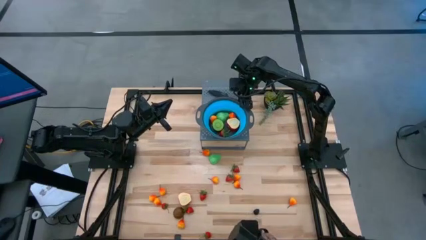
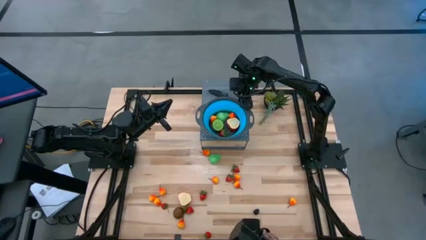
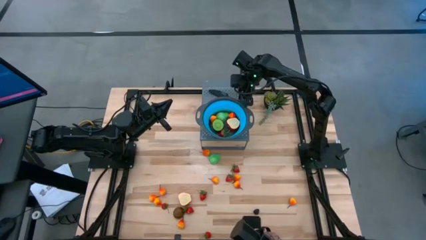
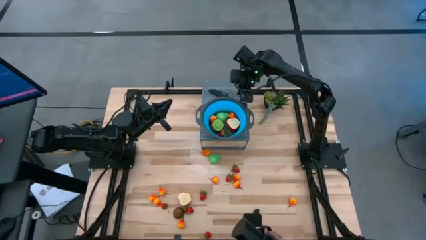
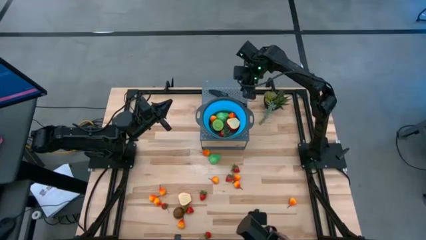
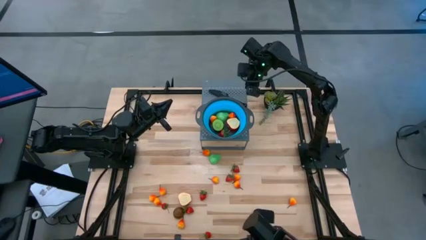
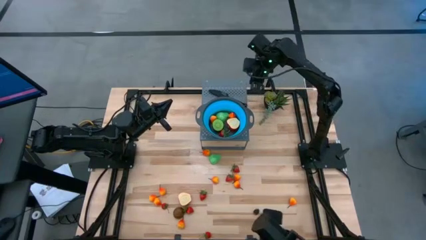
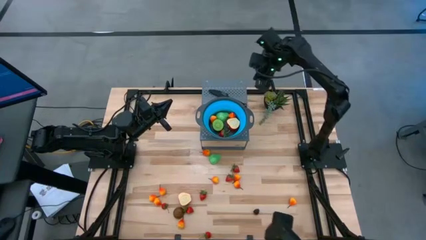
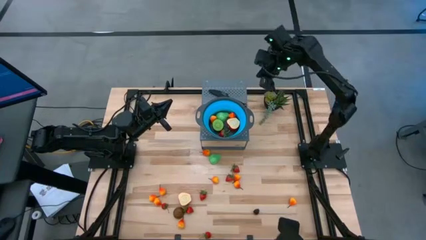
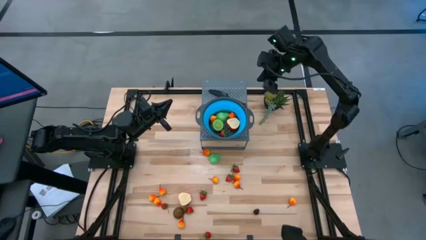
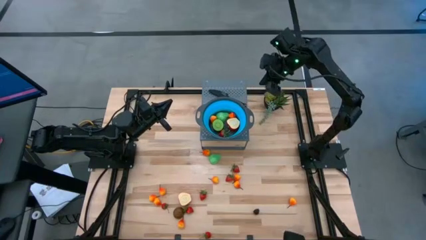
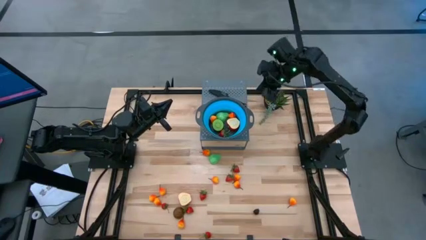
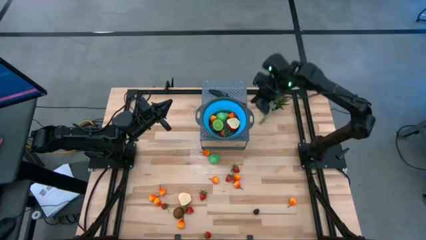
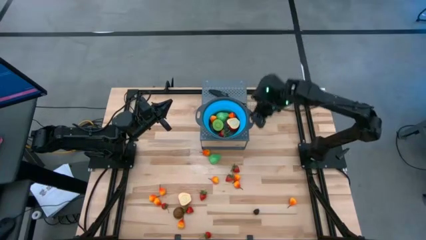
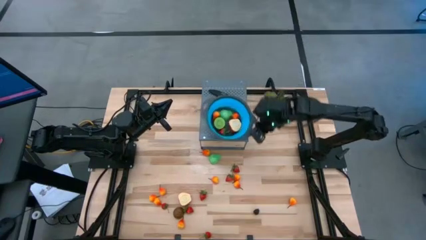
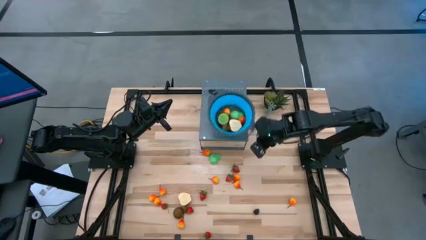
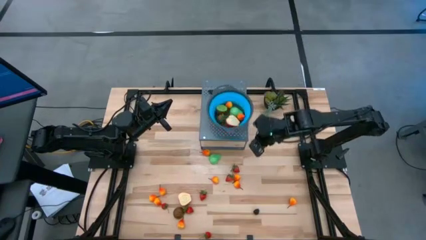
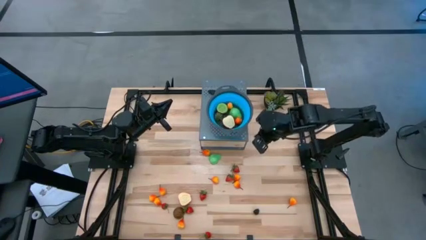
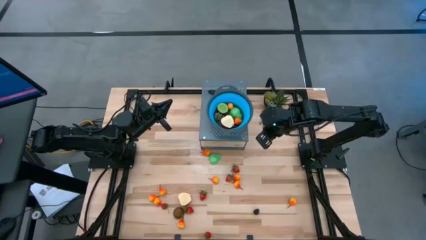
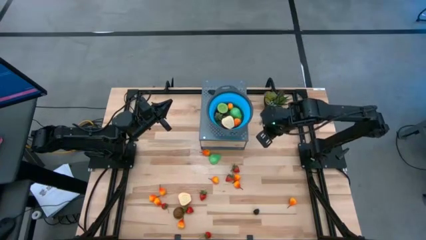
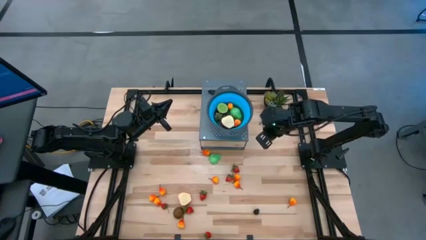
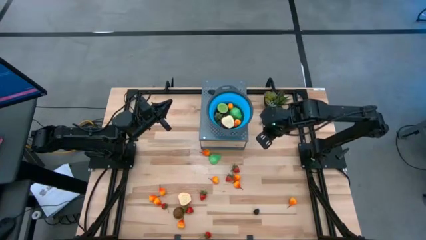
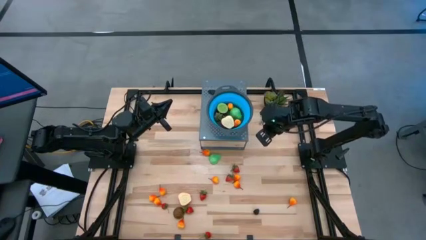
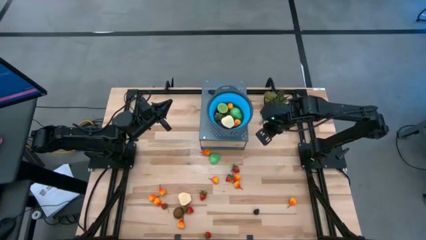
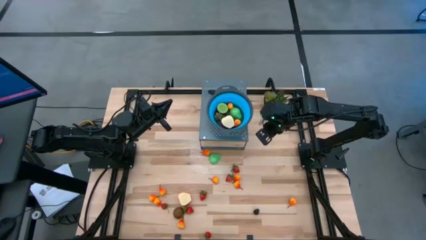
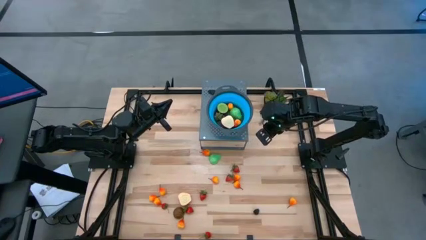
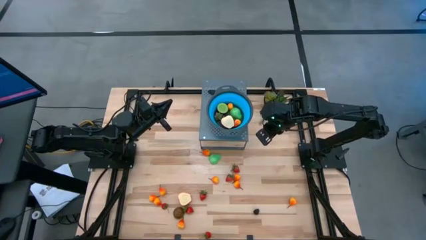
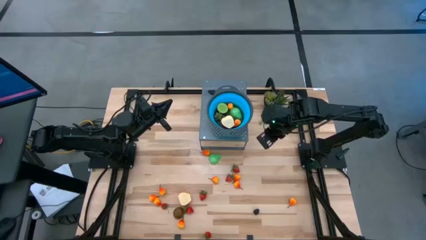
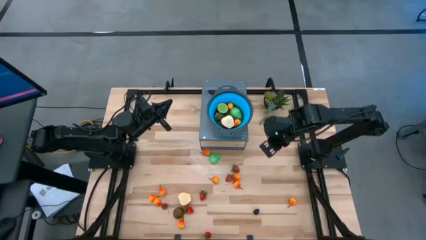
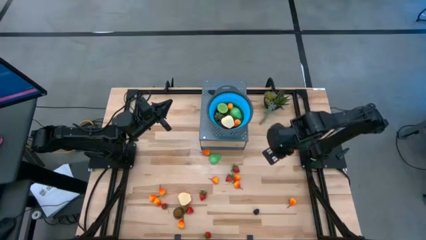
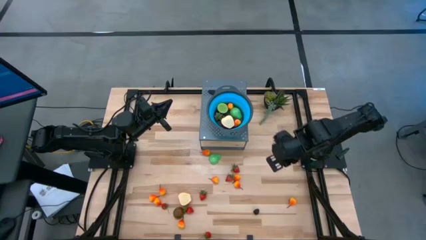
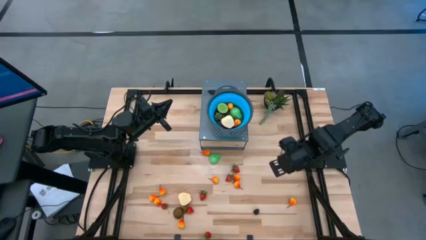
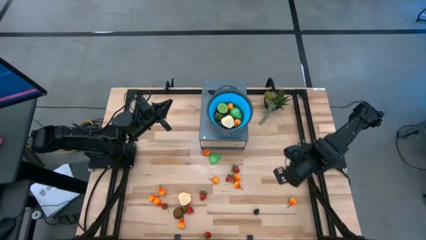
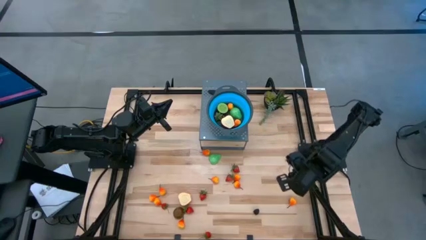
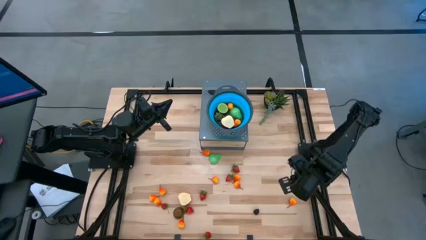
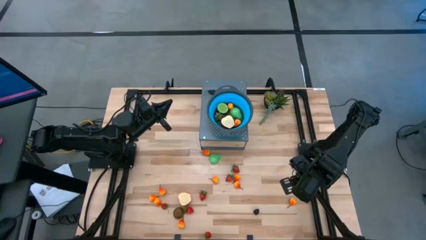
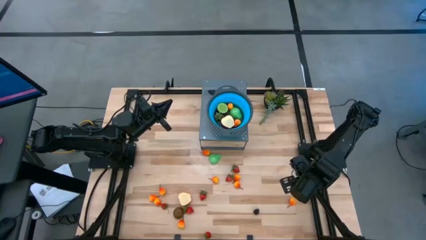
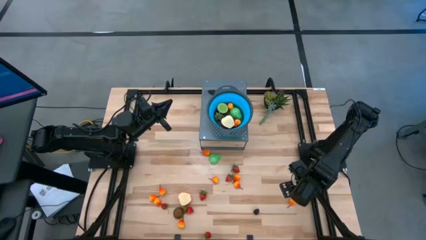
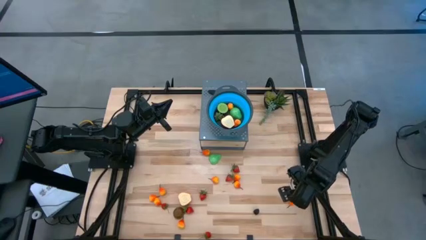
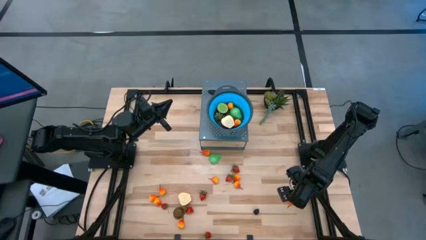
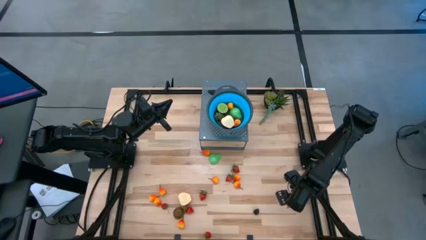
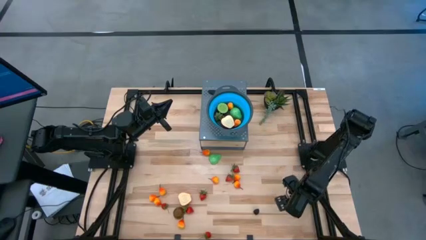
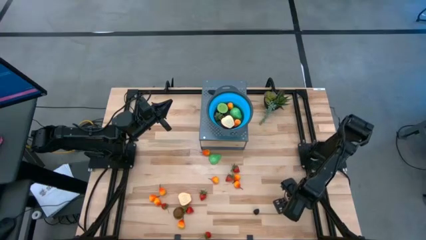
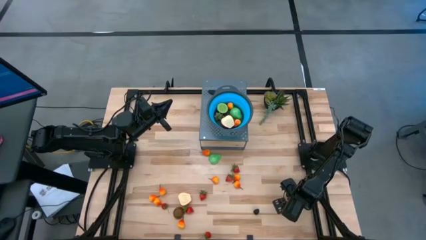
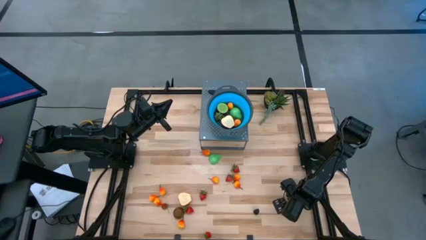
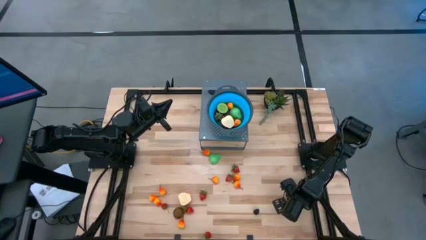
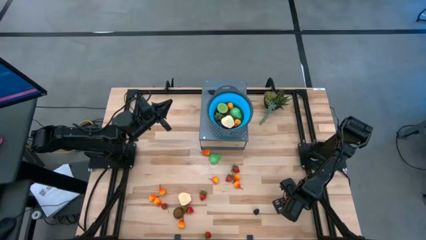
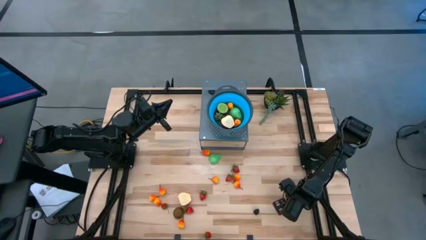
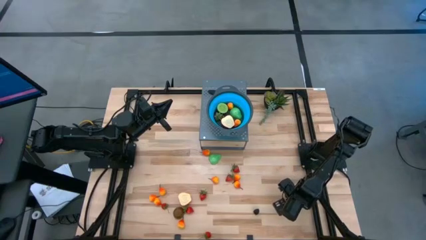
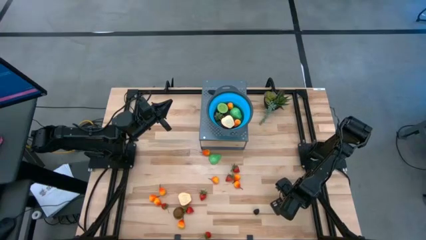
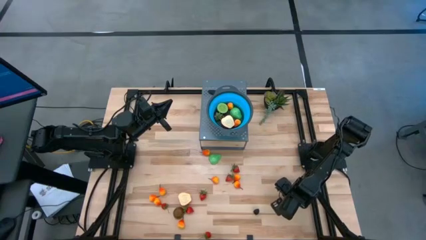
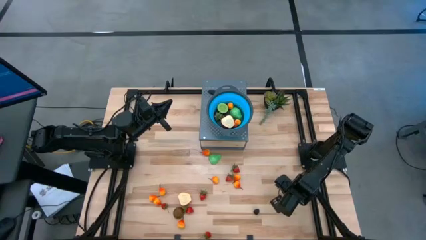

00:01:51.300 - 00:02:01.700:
Task: Pick & Place Fruit
Put the peach into the strainer bowl

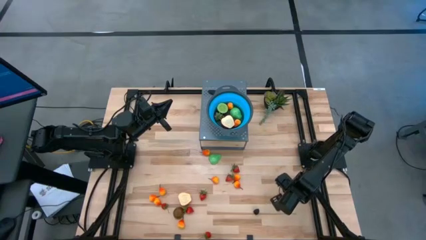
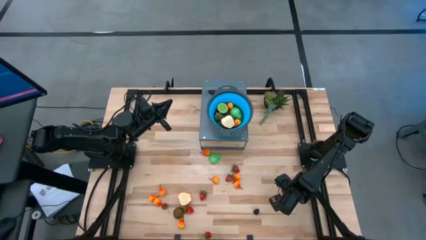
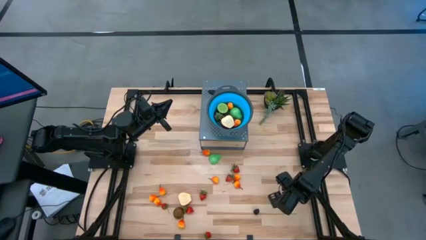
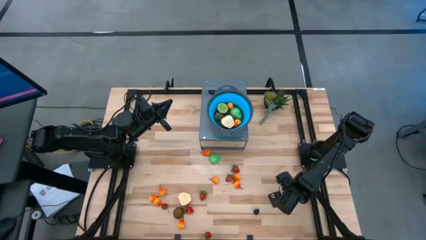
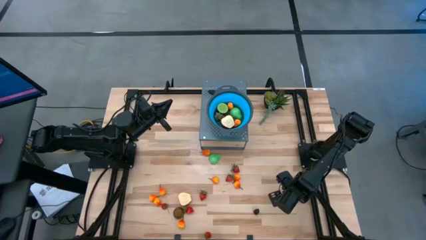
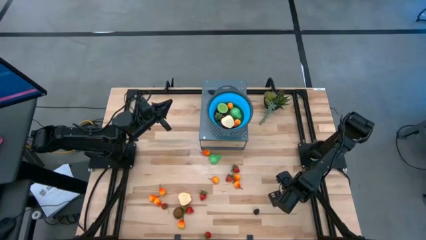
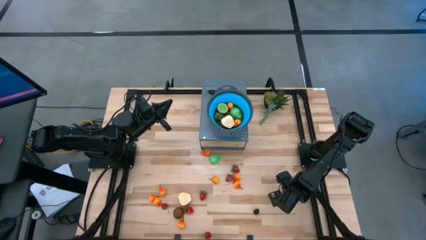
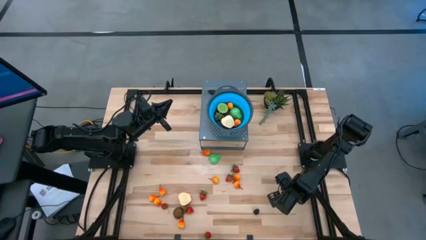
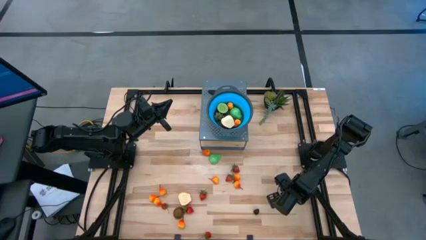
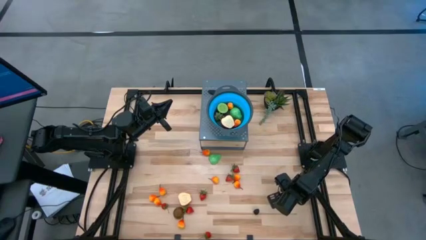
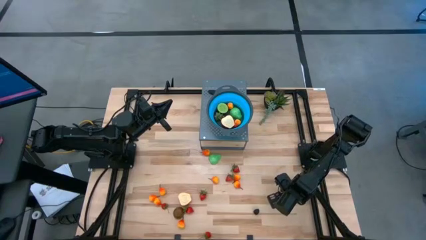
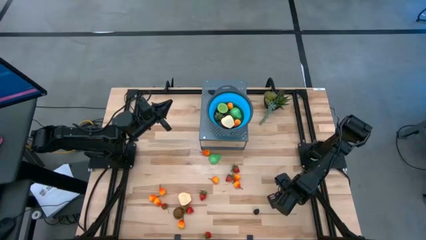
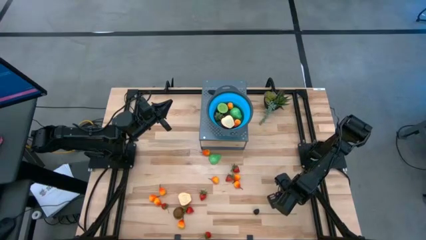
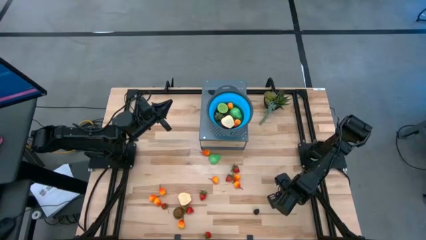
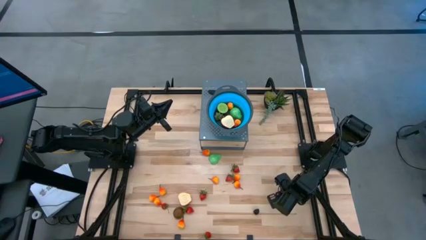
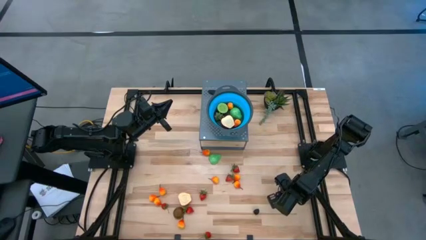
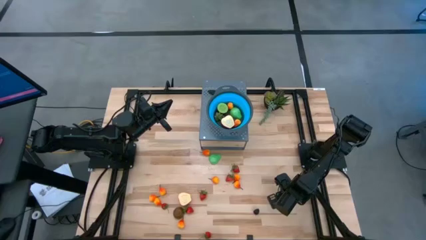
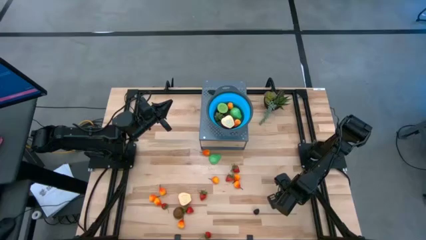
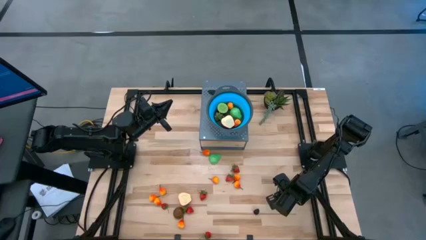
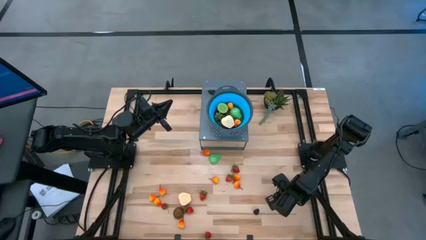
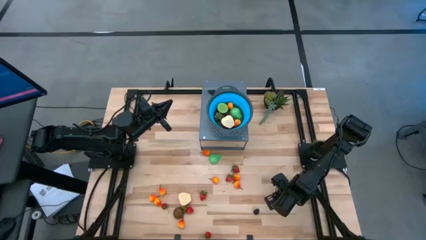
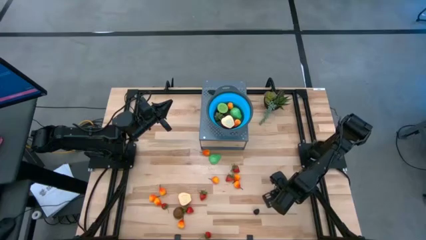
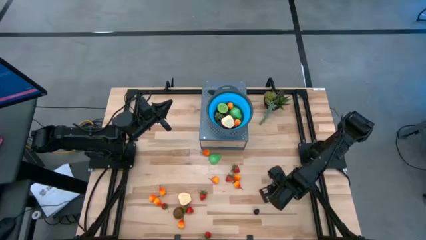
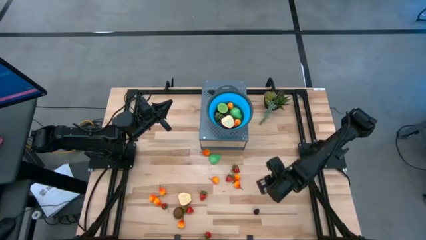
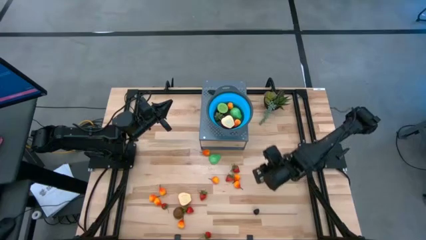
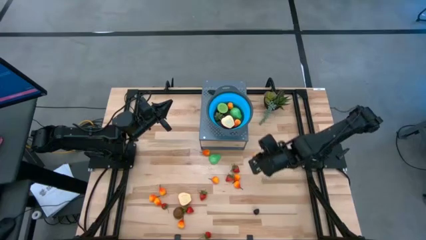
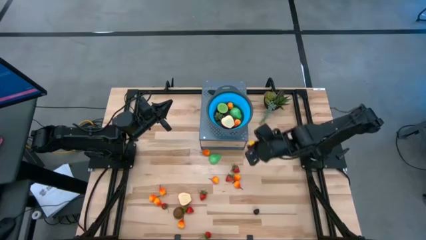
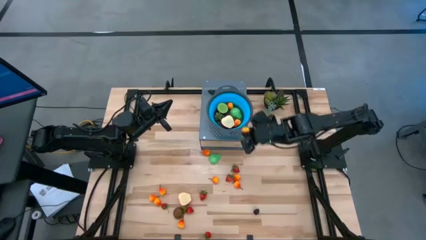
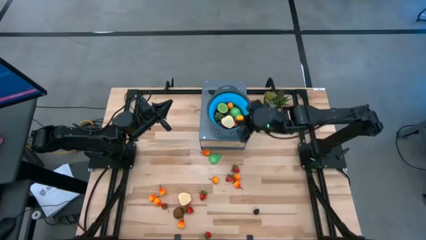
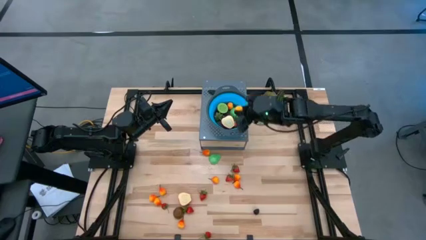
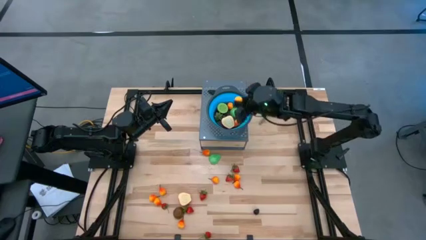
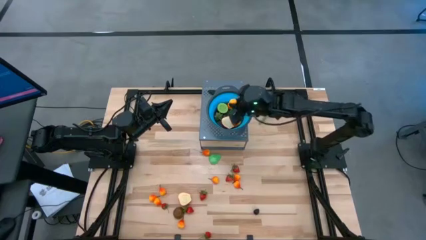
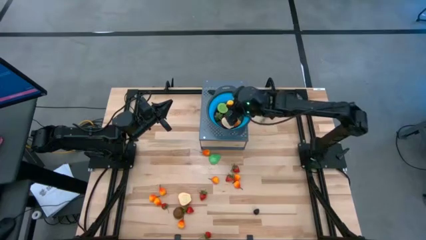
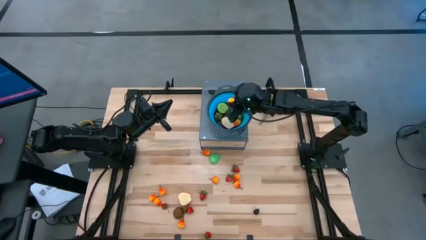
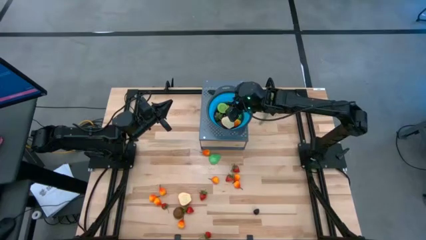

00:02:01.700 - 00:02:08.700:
Put the peach into the strainer bowl
